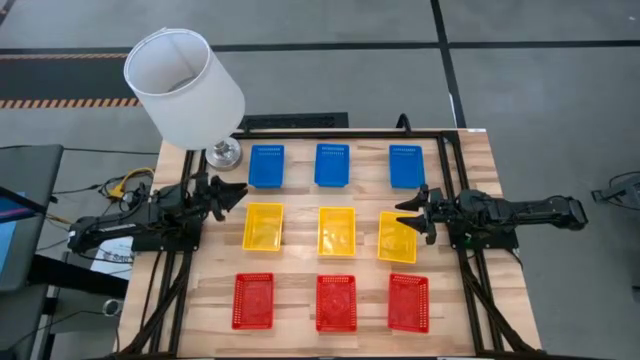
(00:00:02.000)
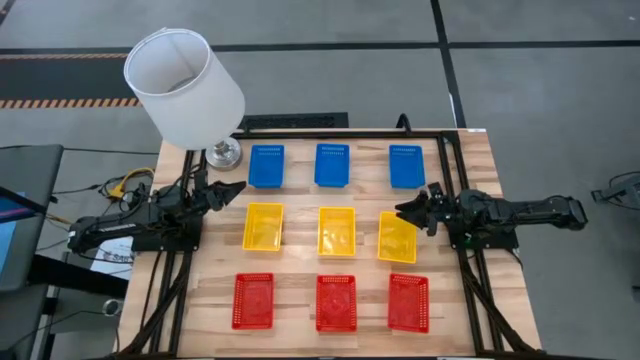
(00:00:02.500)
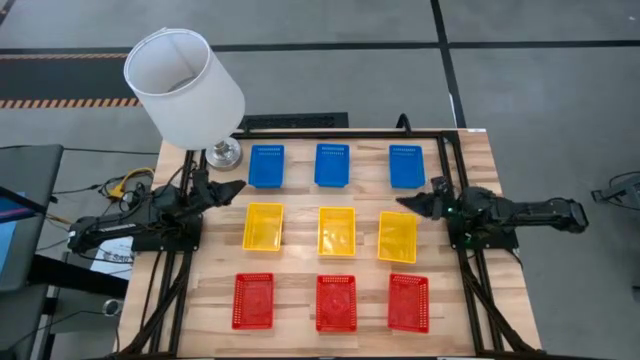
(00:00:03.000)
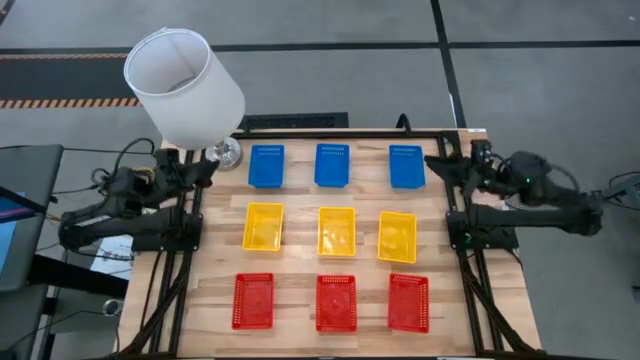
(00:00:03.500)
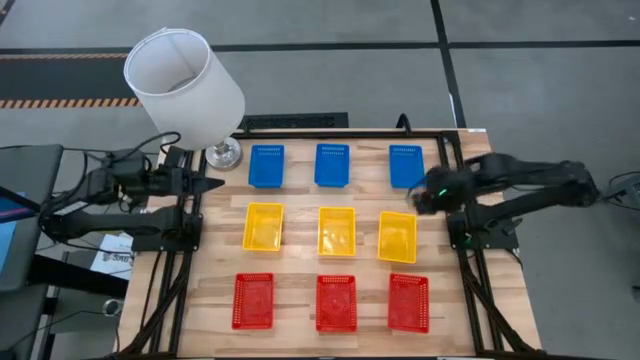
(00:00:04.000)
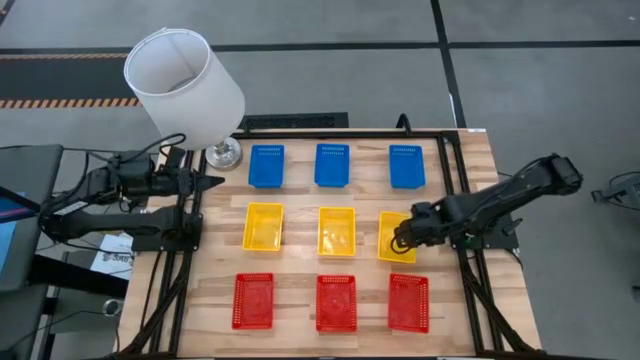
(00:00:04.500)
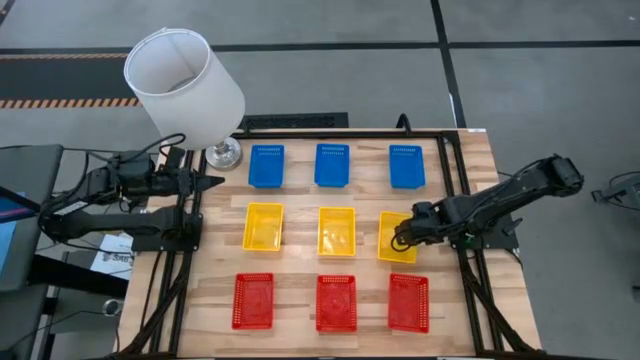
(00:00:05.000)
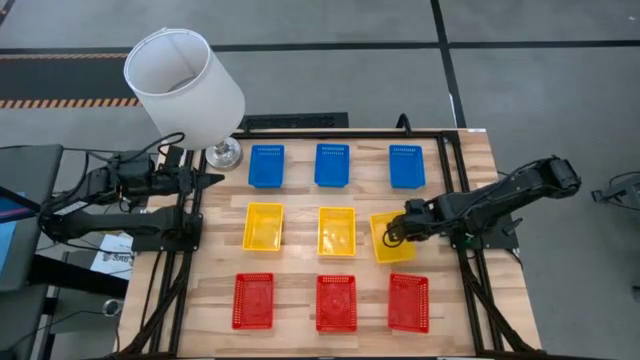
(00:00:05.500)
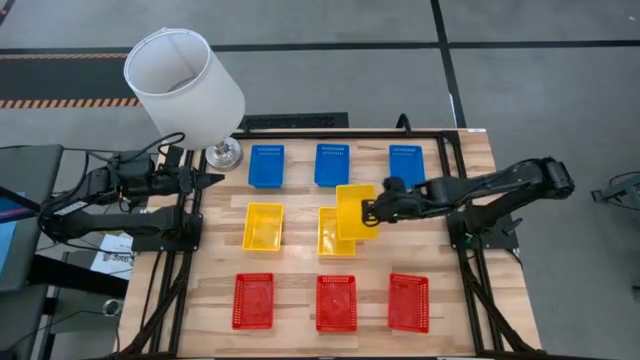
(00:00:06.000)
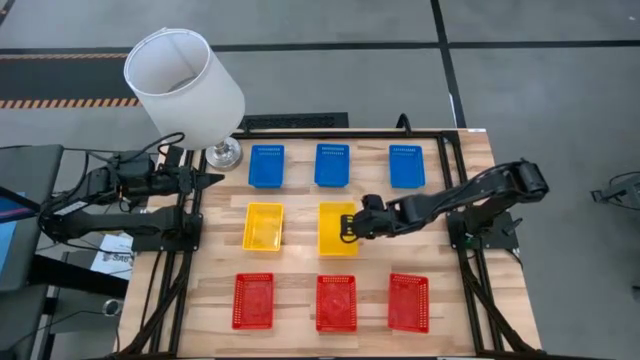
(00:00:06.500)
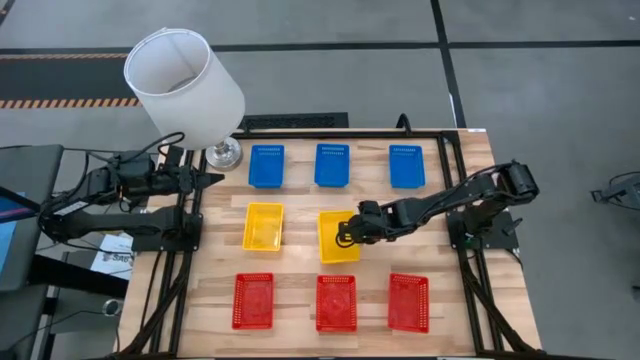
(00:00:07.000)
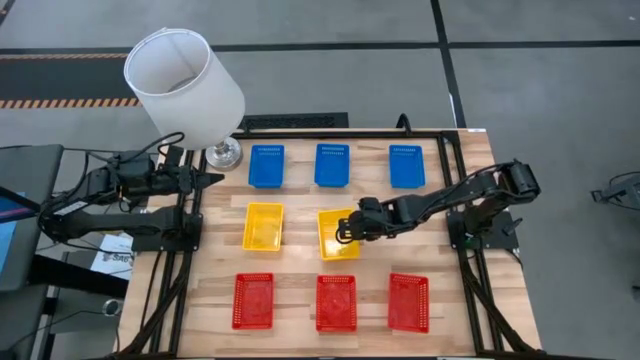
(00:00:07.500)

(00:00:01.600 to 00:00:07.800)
Stack the right yellow bin on the middle yellow bin

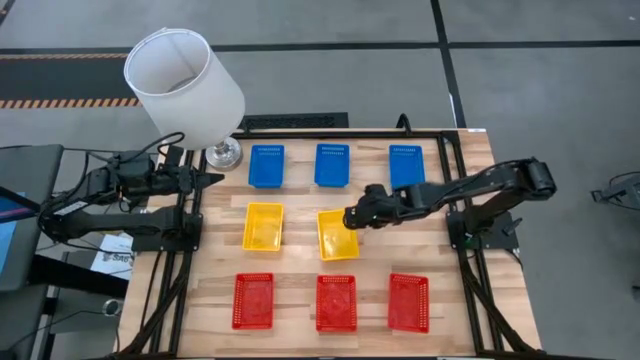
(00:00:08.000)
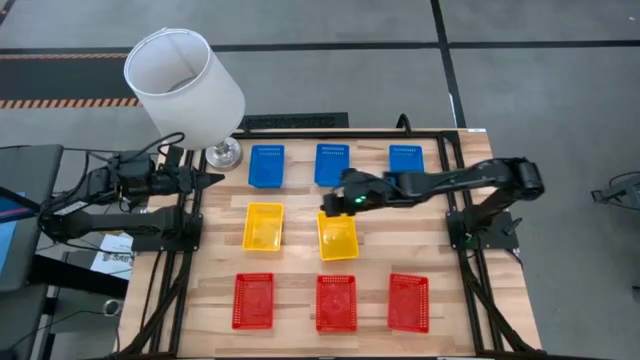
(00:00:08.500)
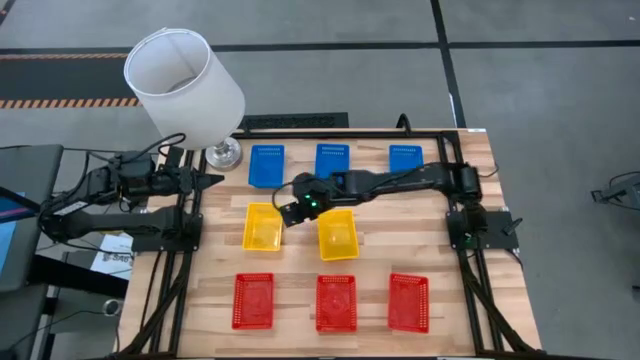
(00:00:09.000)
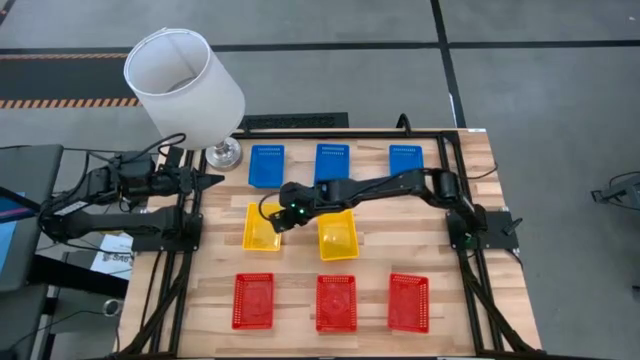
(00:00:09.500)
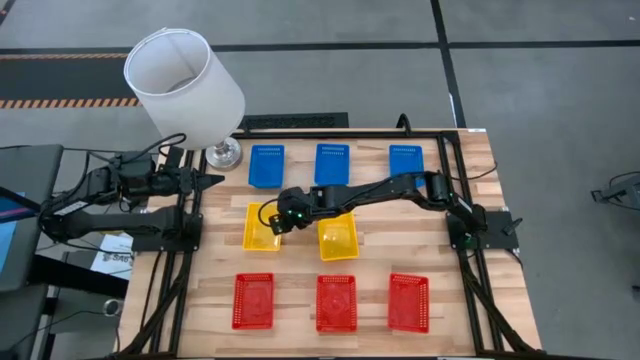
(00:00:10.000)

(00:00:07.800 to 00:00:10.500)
Stack the left yellow bin on the yellow bin

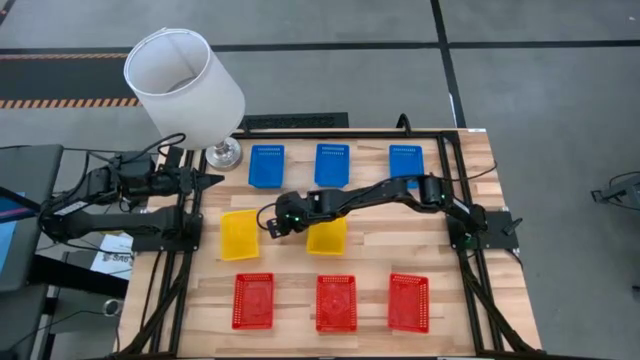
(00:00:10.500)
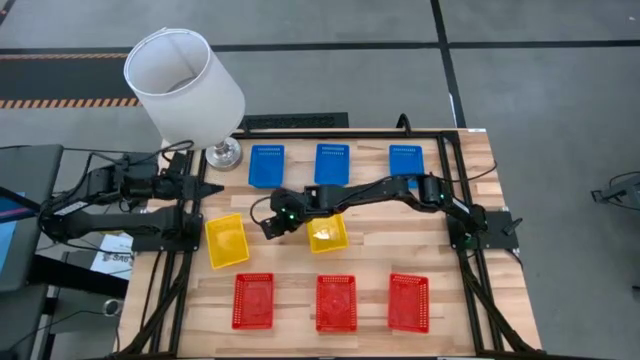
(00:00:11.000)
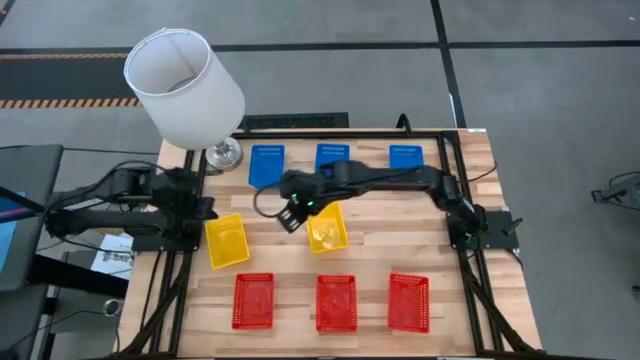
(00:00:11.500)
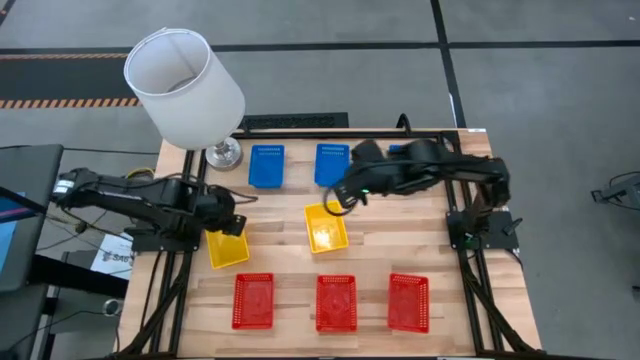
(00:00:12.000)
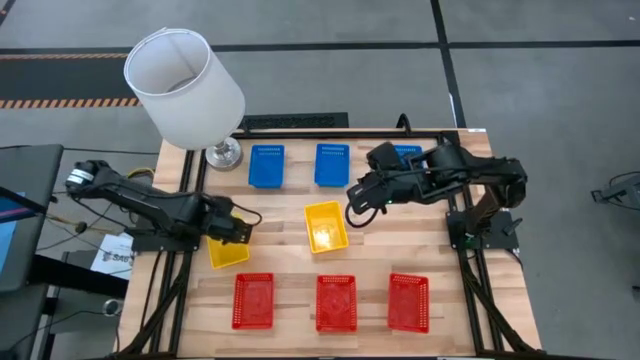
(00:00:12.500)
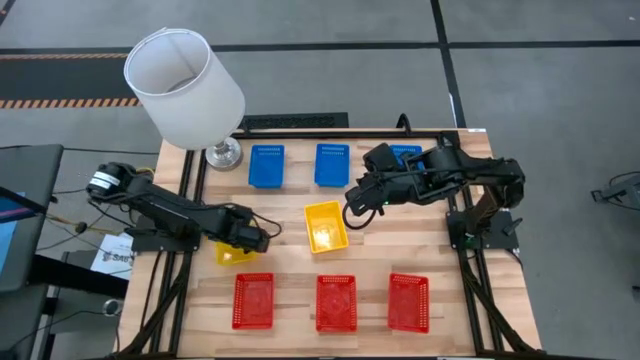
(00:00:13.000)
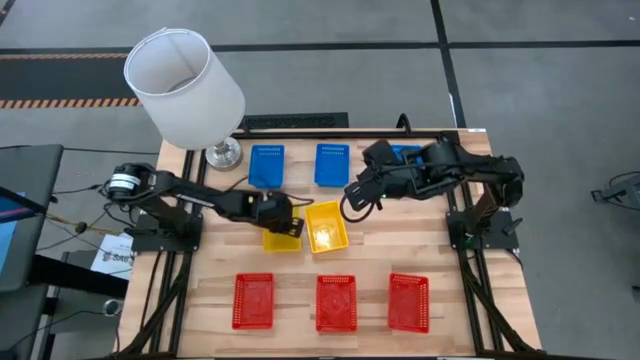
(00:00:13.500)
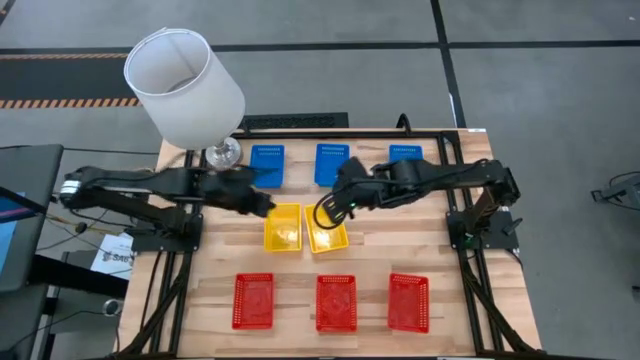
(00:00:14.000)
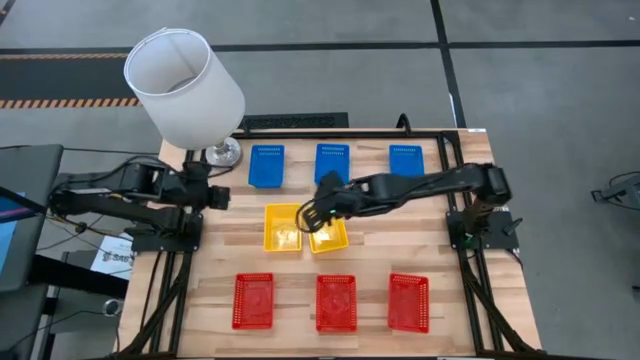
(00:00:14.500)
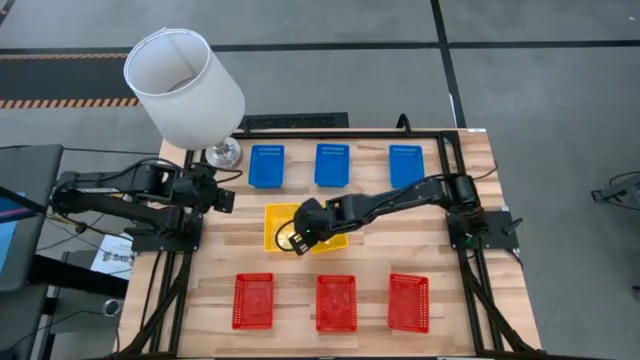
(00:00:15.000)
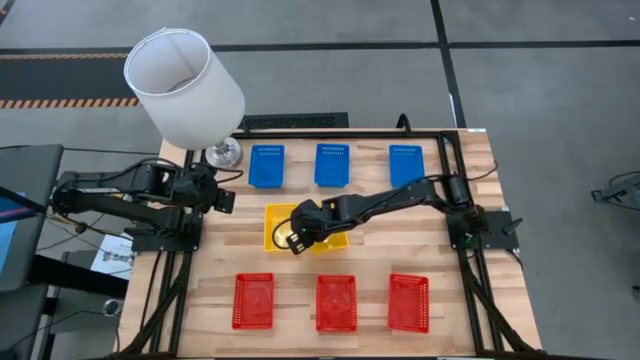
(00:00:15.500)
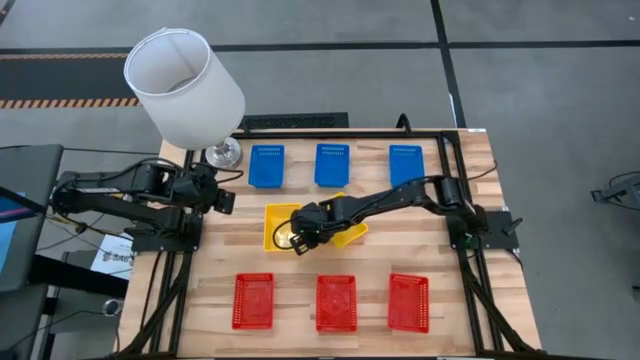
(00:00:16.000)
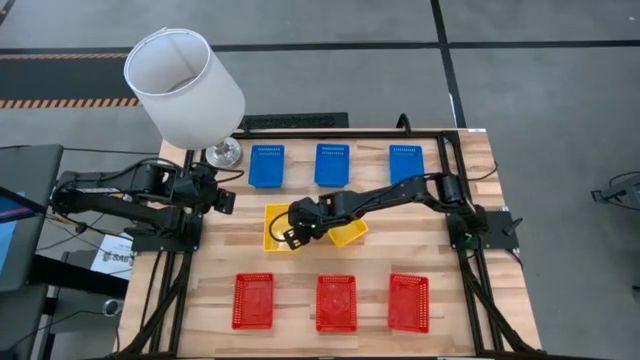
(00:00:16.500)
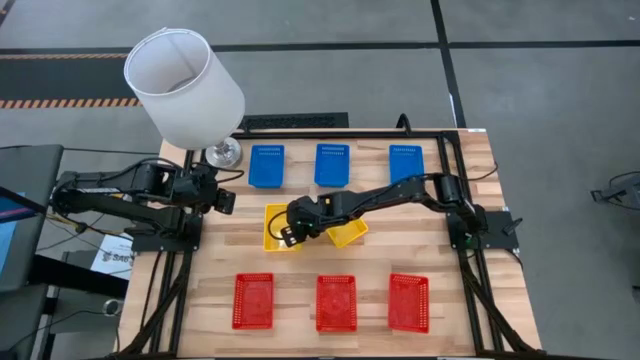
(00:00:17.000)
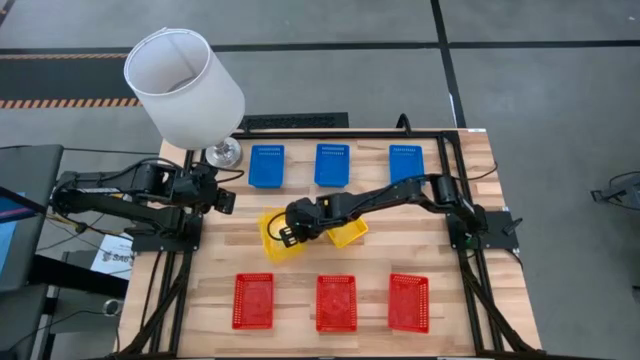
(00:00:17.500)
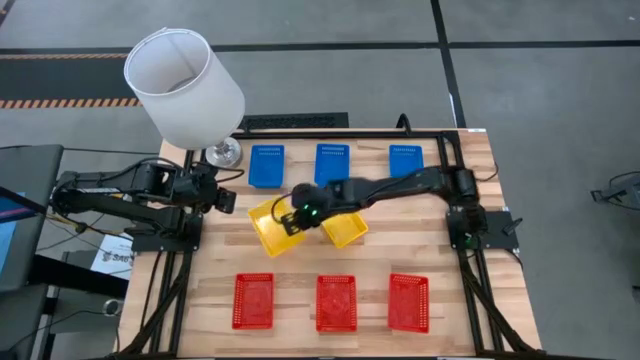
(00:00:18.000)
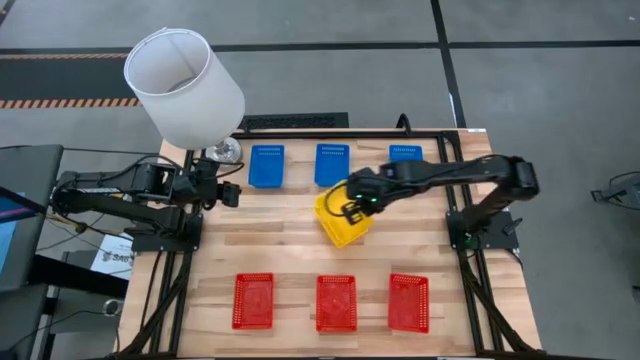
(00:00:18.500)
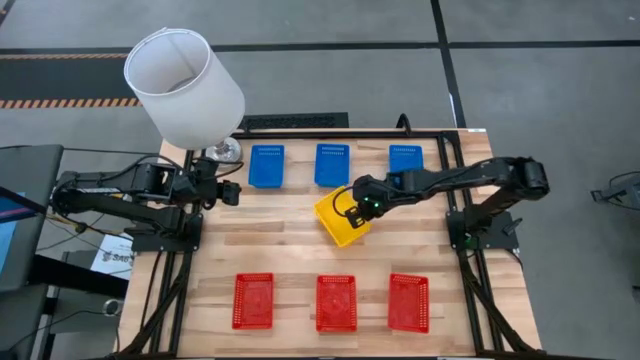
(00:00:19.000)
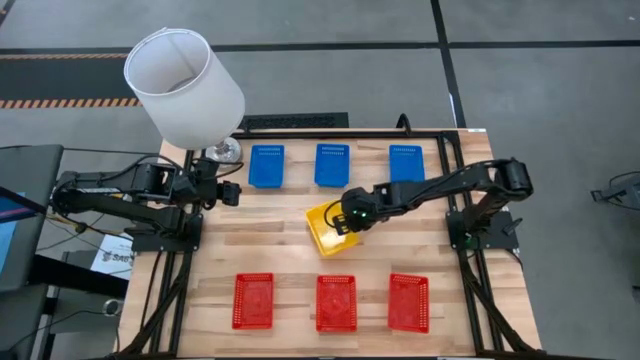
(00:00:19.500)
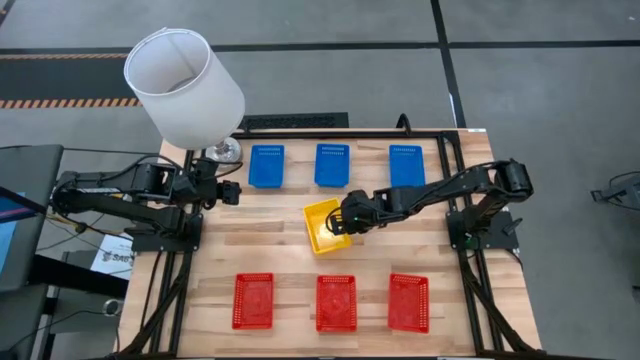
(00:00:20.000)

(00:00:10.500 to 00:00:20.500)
Stack the left yellow bin on the yellow bin

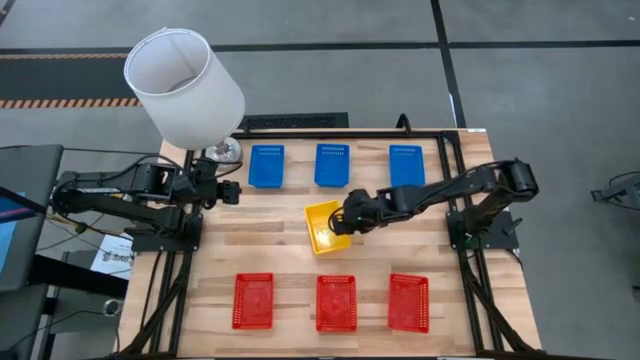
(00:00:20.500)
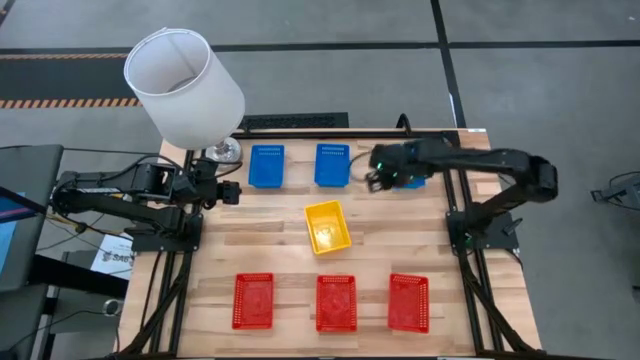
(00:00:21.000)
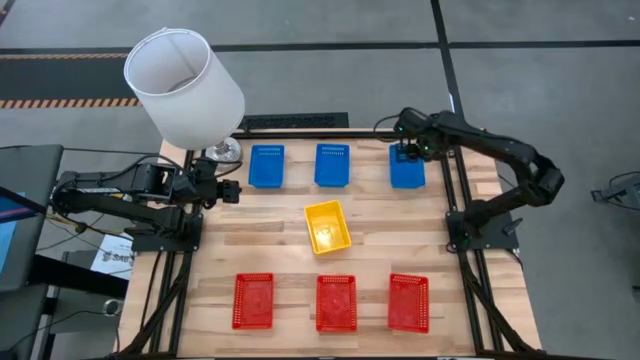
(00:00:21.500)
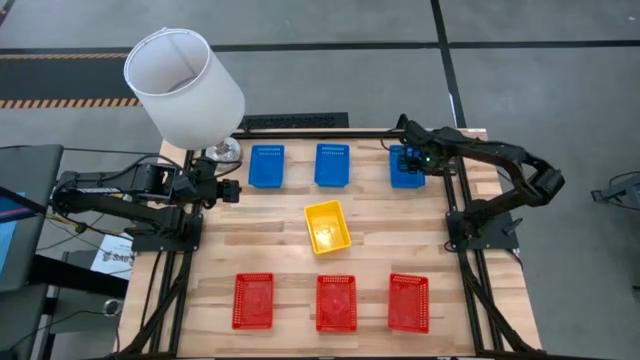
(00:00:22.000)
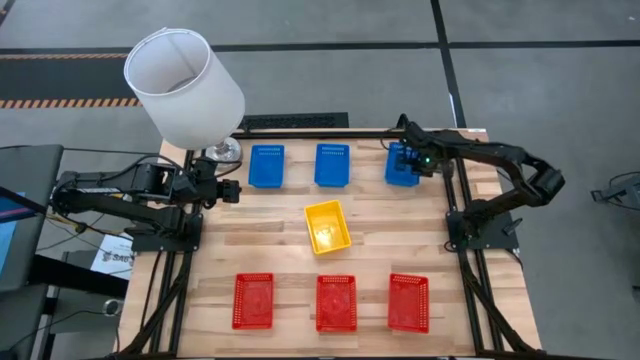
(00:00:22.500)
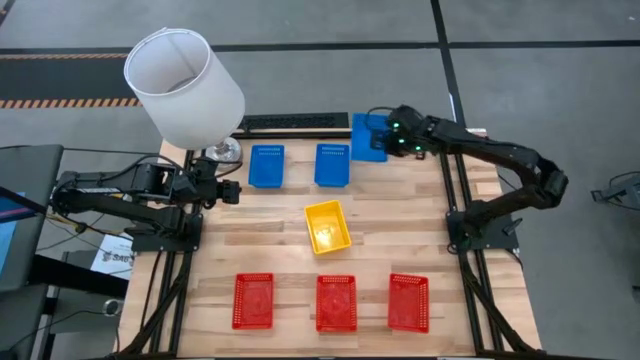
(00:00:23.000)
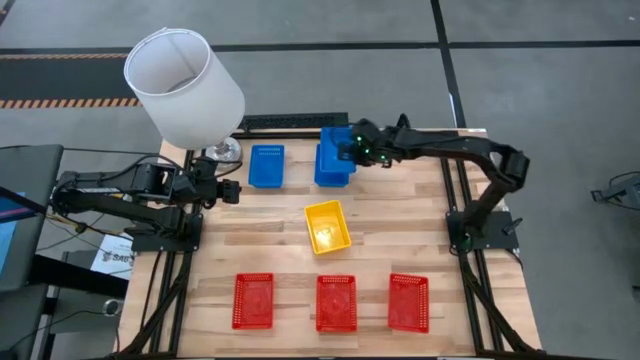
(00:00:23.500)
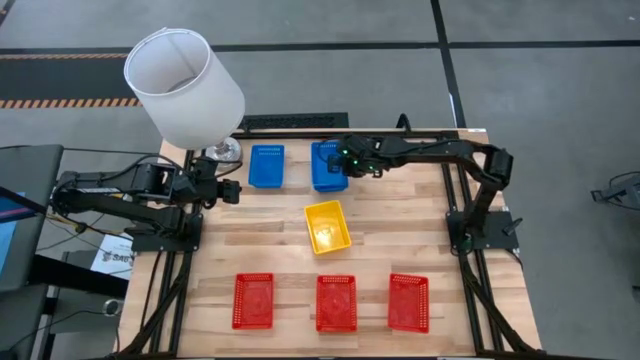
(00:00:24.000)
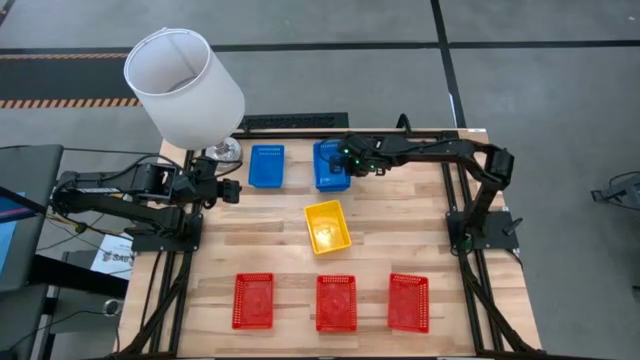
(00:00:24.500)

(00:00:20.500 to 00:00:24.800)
Stack the right blue bin on the middle blue bin
